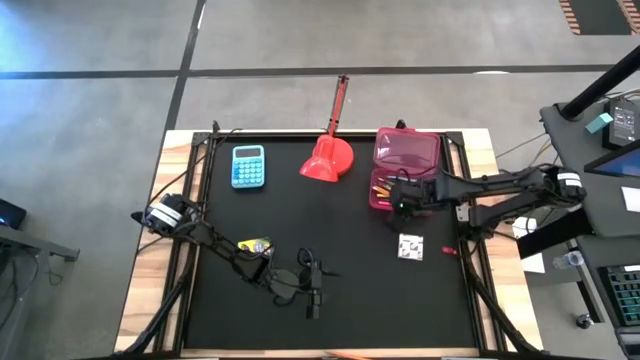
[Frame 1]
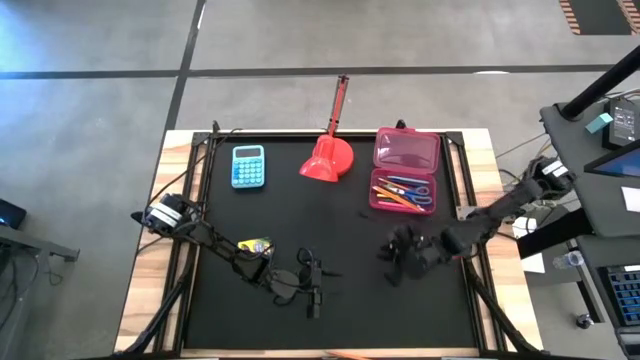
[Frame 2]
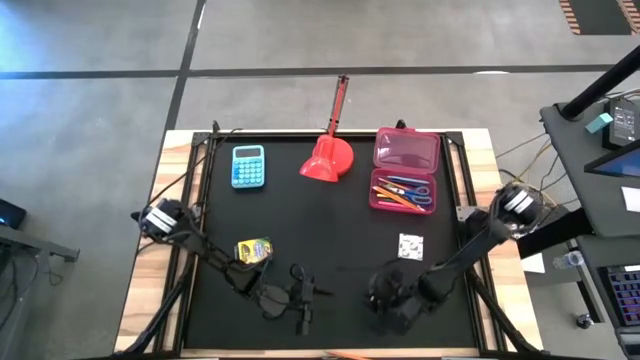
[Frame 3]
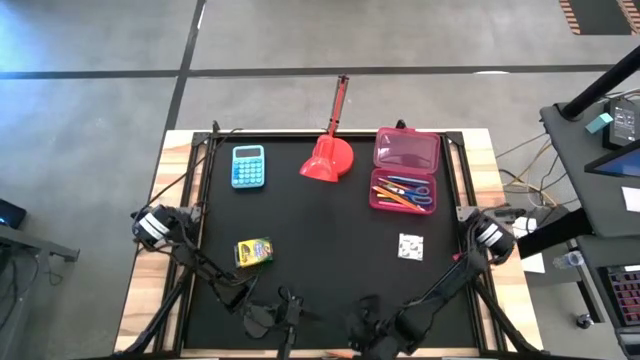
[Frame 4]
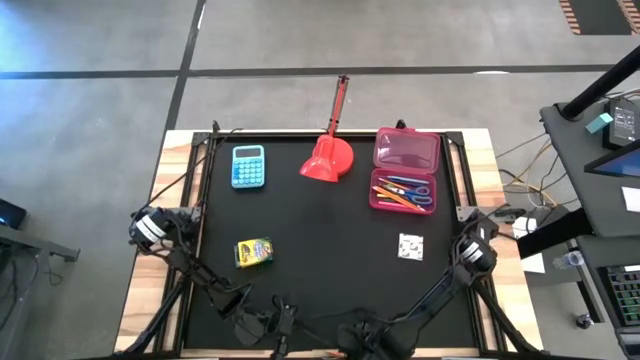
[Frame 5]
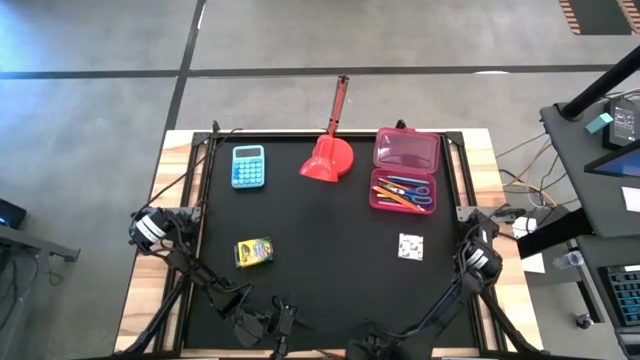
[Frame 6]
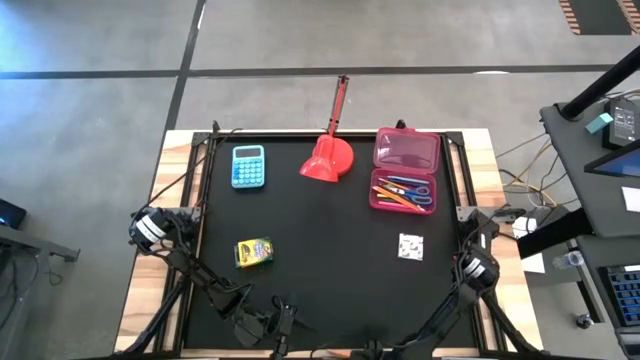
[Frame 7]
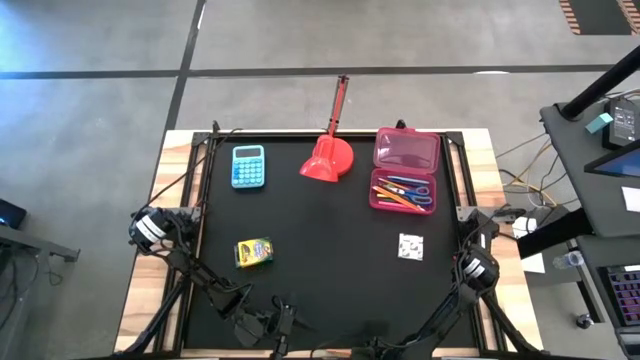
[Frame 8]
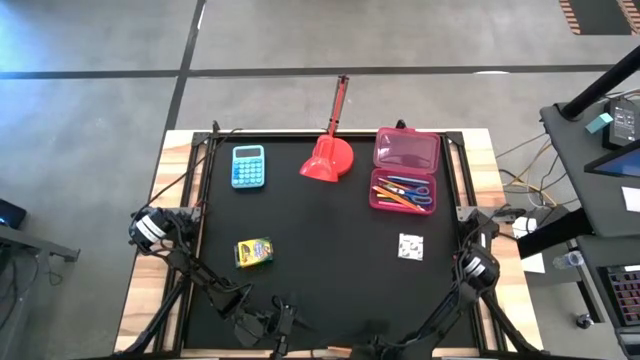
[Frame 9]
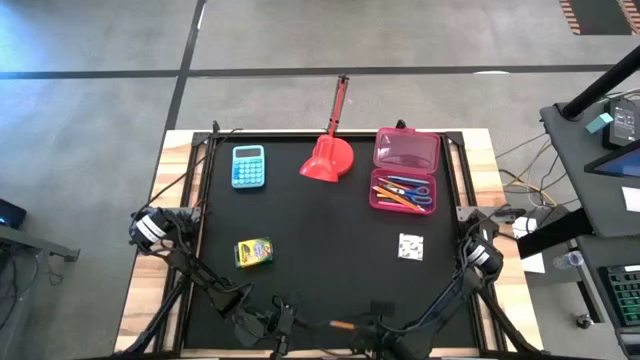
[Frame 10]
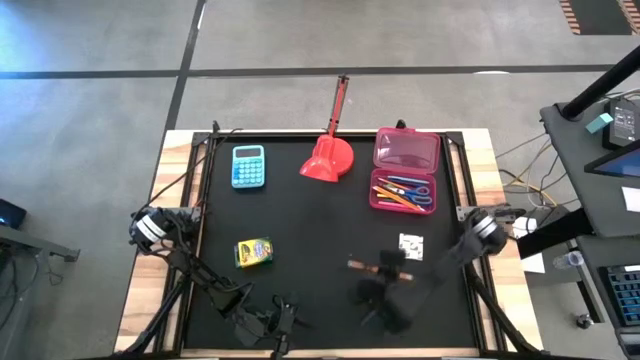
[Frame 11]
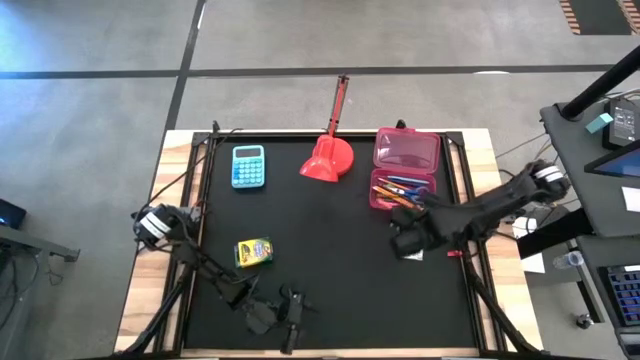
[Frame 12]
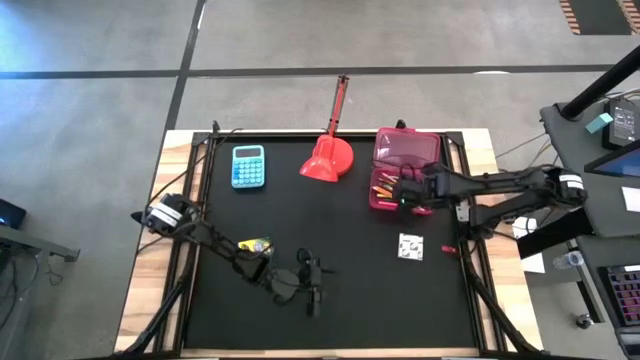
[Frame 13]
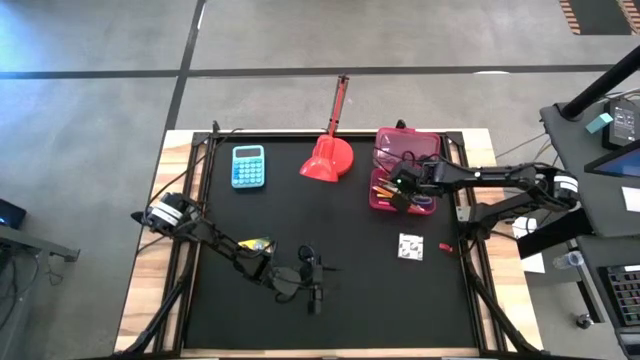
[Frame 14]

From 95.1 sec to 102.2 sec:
Task: Pack school essentials
Put the orange pencil into the pink supply box

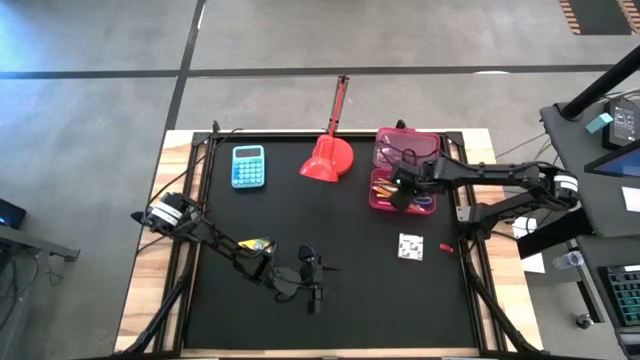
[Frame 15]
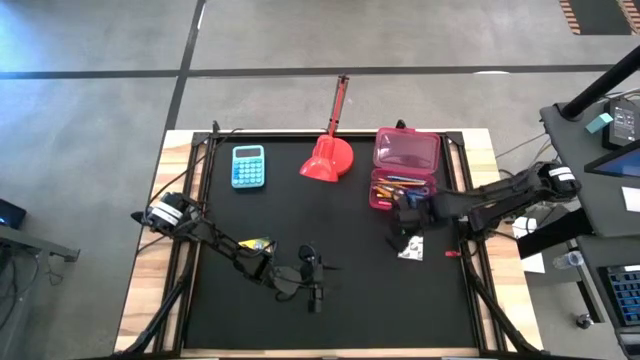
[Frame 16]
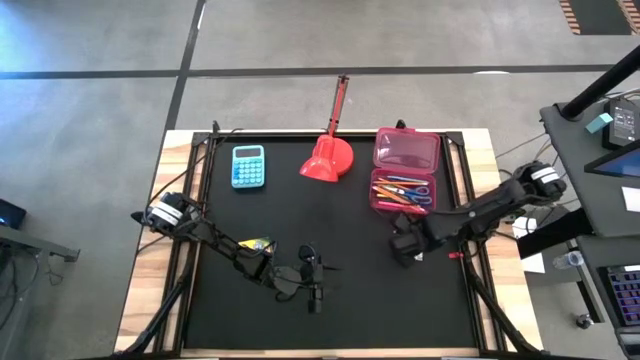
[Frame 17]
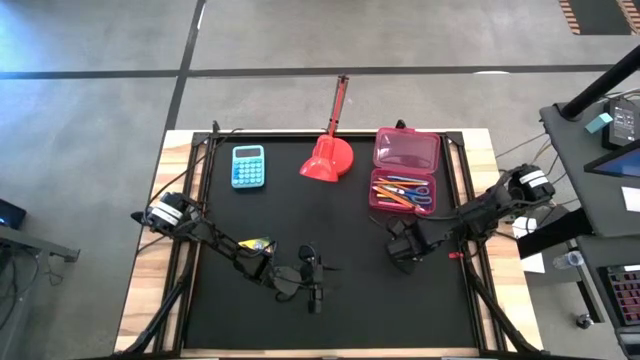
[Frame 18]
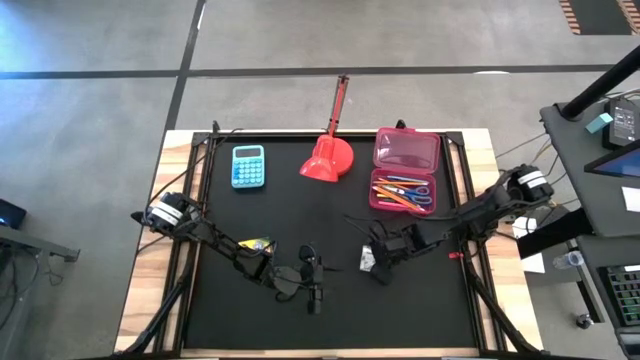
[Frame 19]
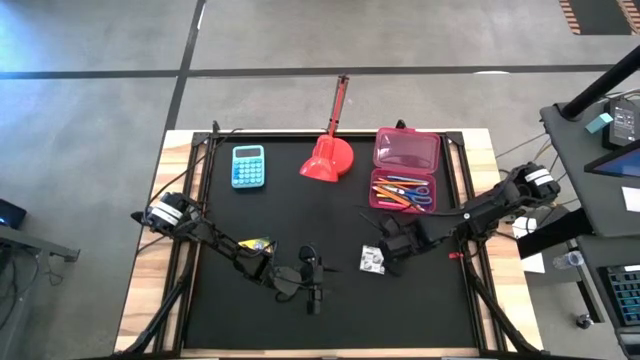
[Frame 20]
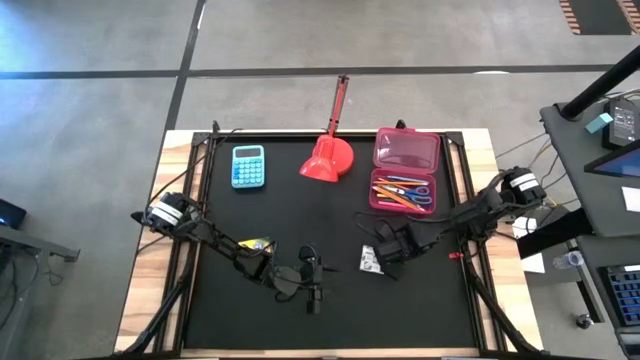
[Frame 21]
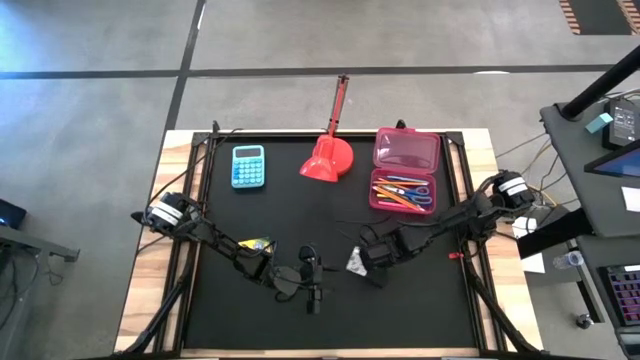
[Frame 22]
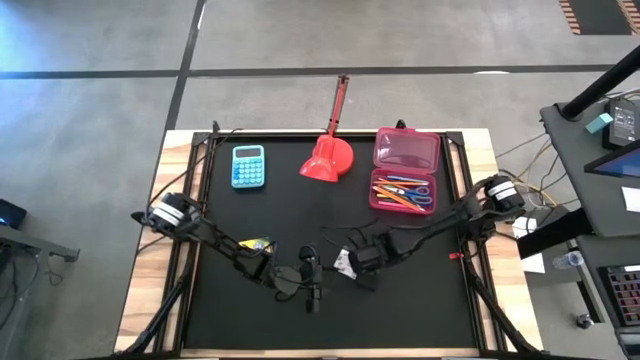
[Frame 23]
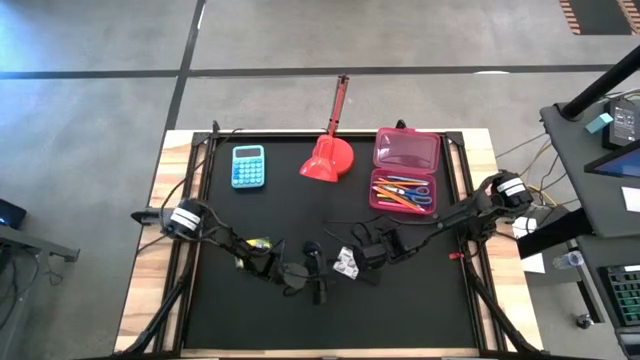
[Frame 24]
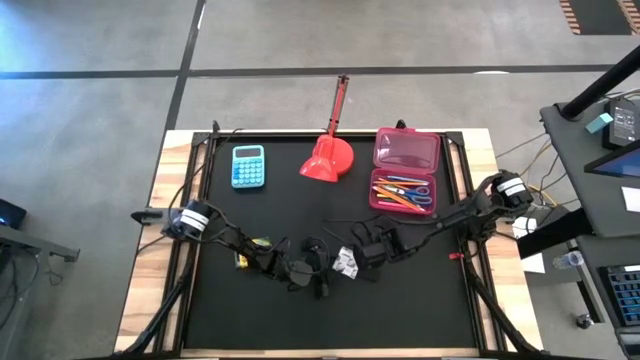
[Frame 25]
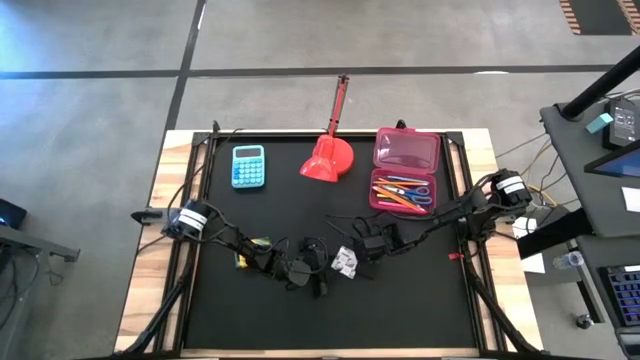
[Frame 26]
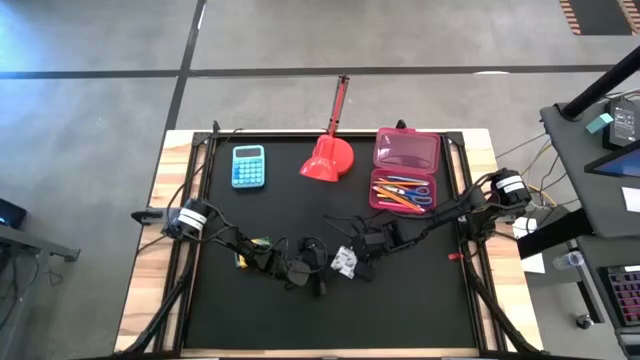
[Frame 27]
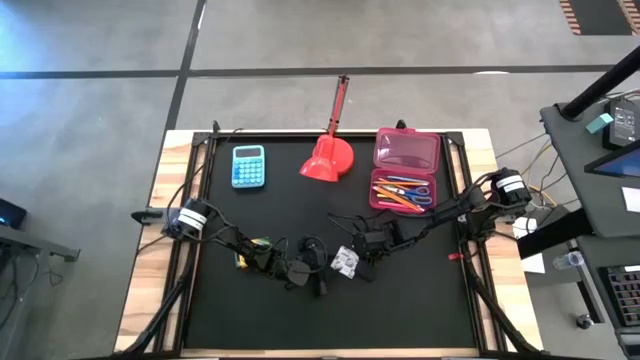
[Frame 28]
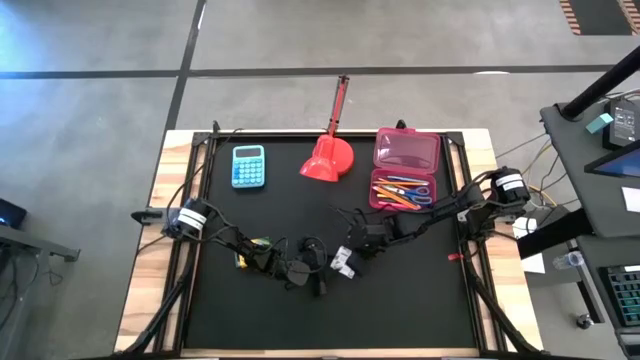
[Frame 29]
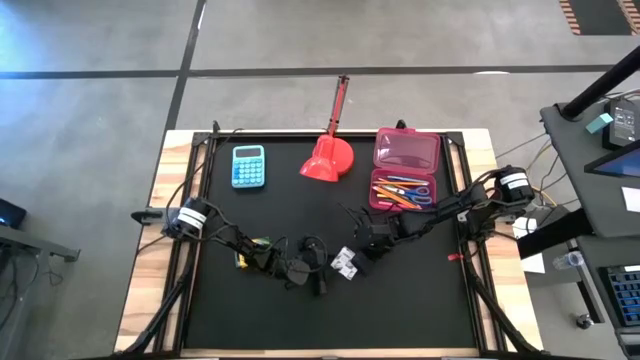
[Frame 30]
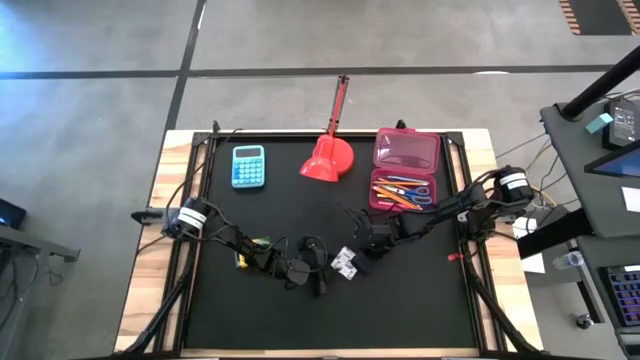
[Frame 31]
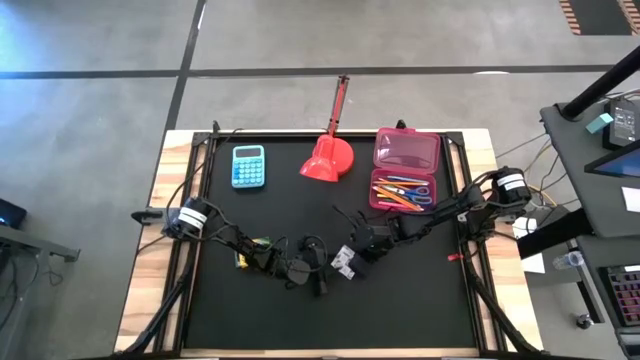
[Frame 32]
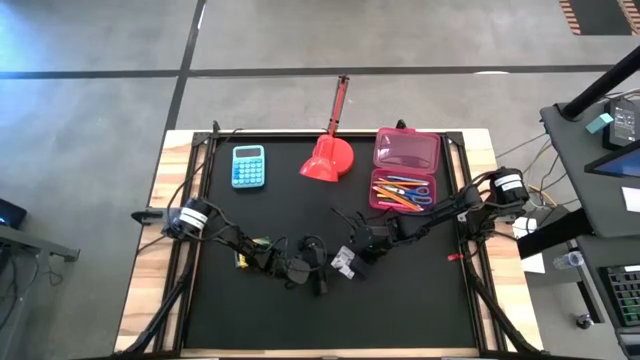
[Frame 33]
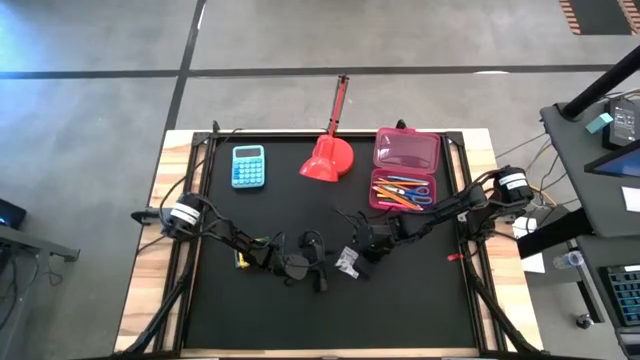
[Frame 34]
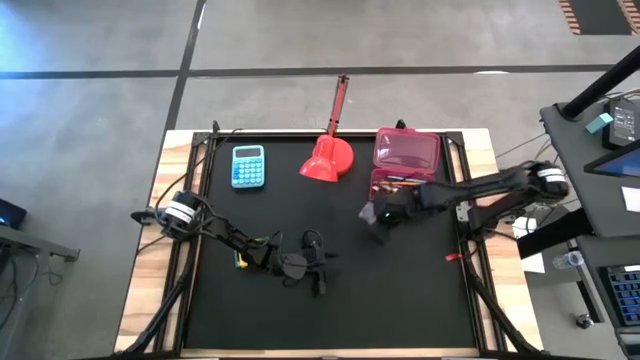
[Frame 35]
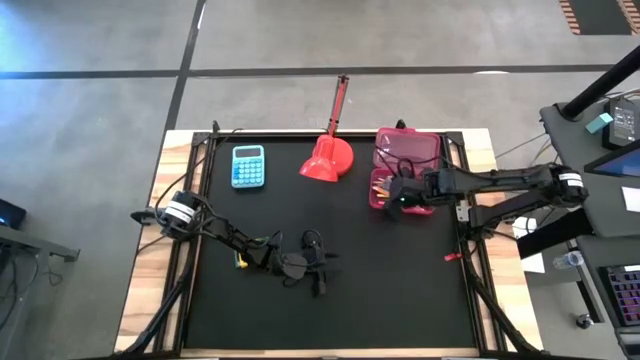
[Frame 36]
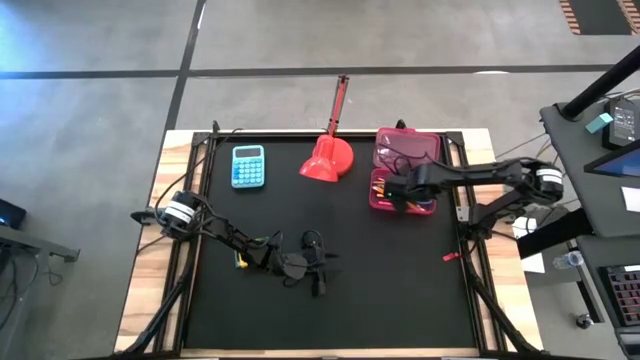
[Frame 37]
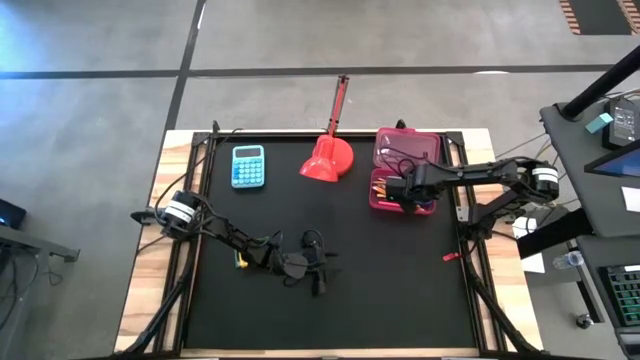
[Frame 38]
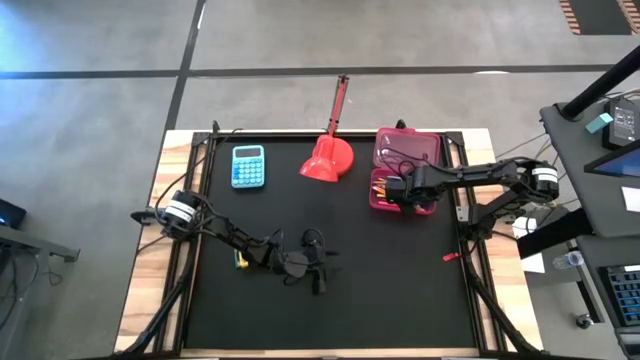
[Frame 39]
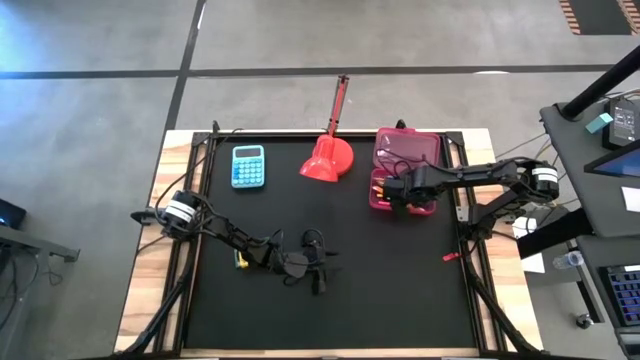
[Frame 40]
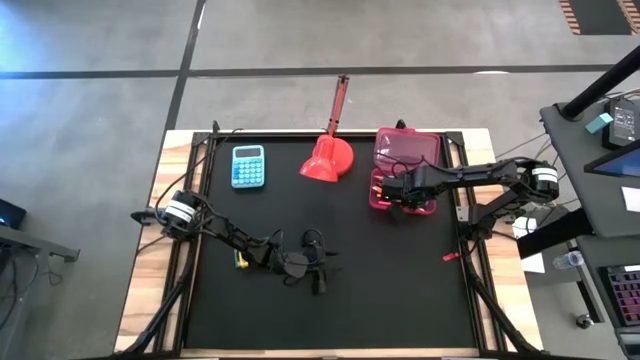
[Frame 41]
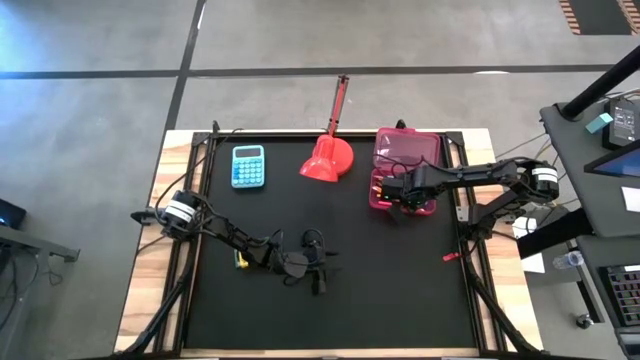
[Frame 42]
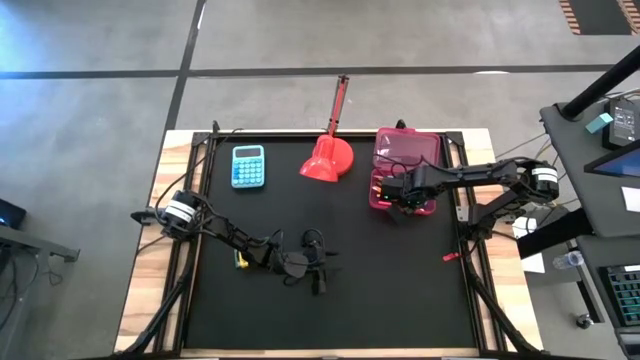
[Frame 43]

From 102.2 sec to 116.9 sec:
Put the white sticky note into the pink supply box
